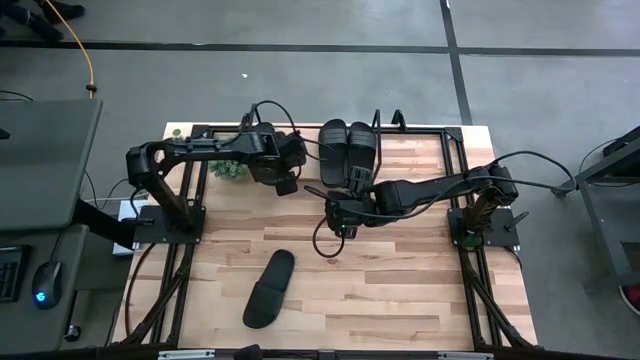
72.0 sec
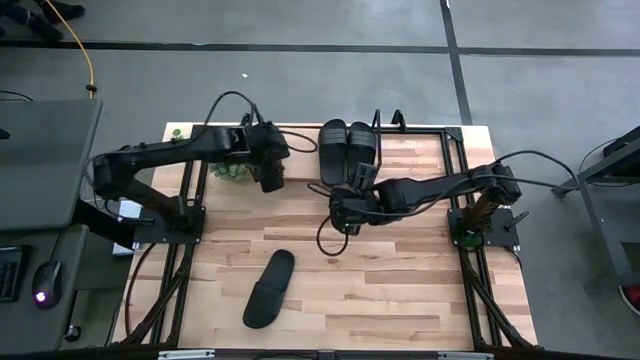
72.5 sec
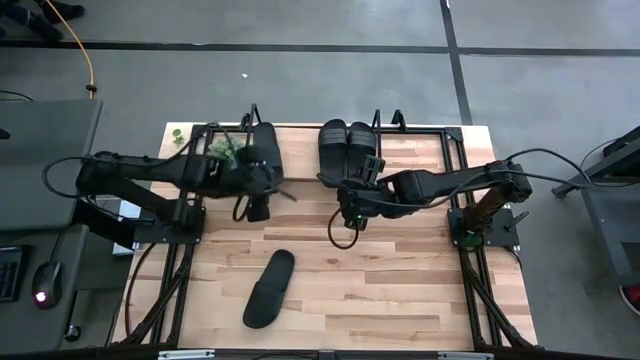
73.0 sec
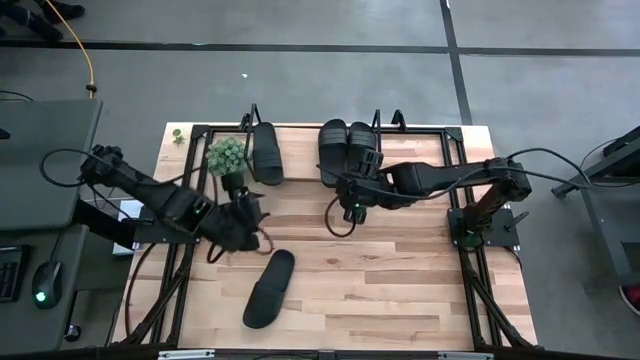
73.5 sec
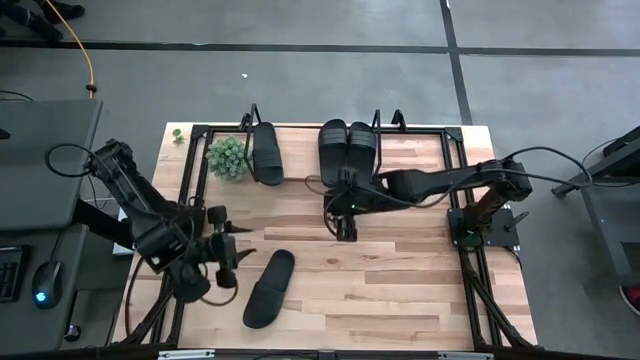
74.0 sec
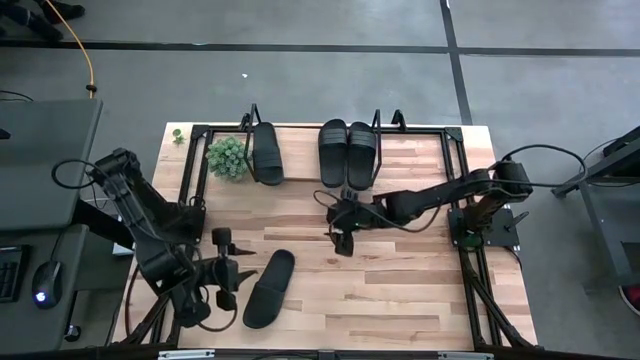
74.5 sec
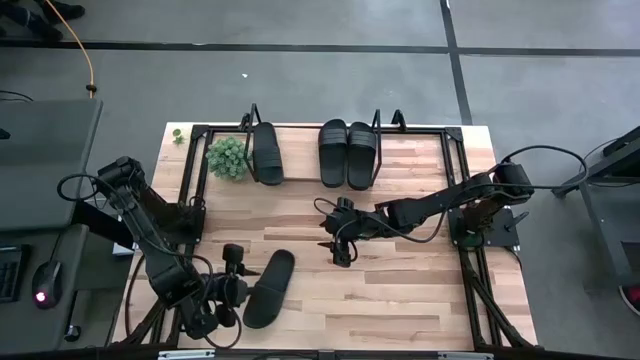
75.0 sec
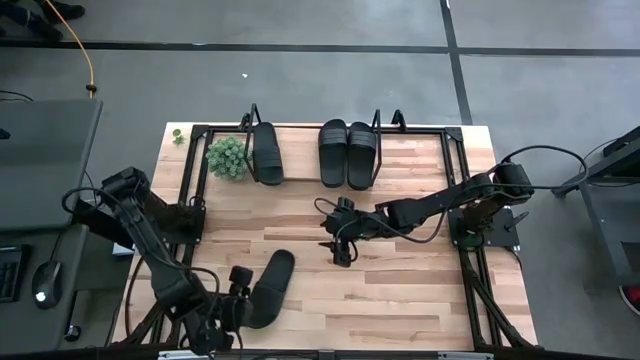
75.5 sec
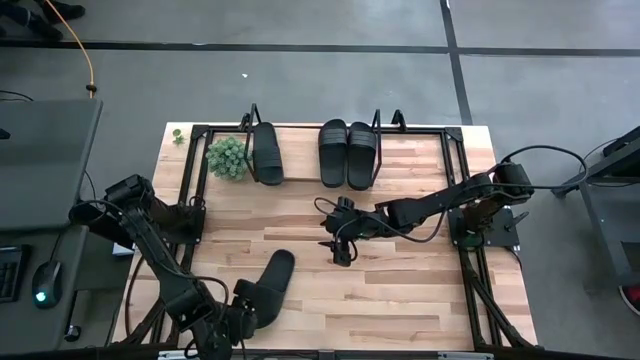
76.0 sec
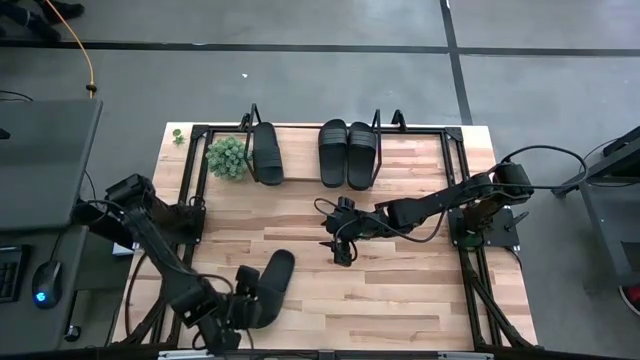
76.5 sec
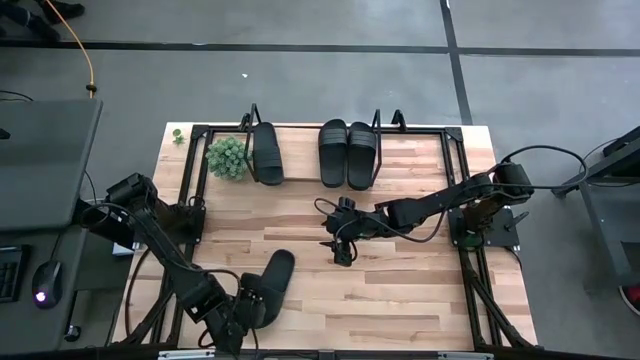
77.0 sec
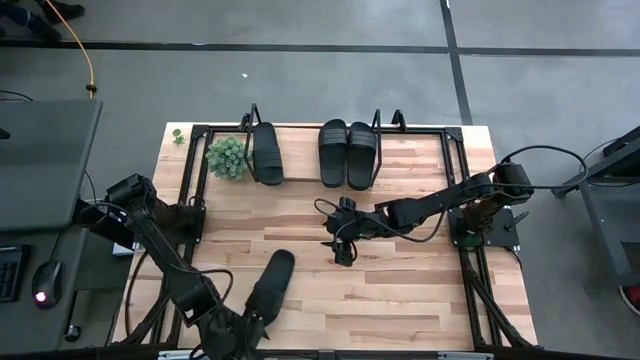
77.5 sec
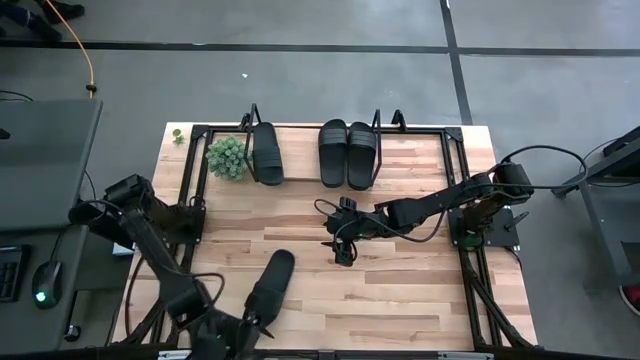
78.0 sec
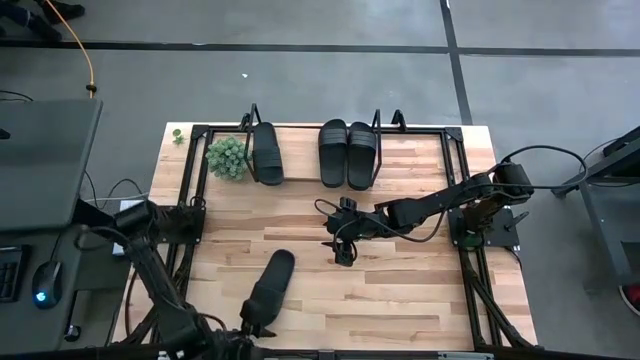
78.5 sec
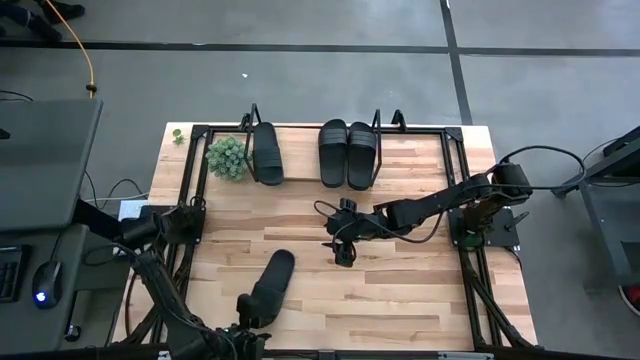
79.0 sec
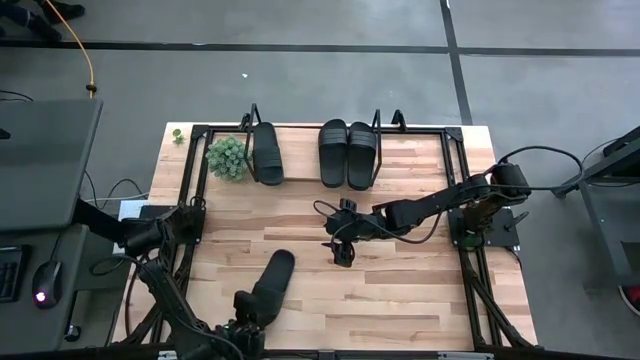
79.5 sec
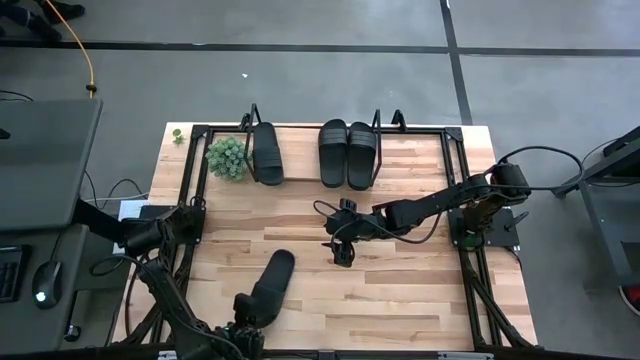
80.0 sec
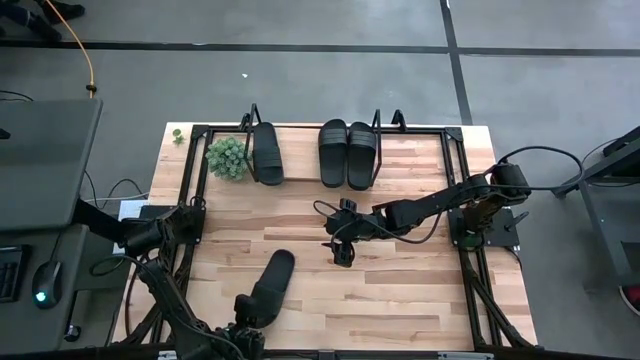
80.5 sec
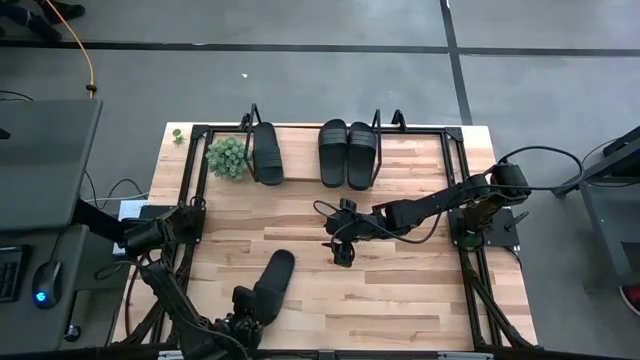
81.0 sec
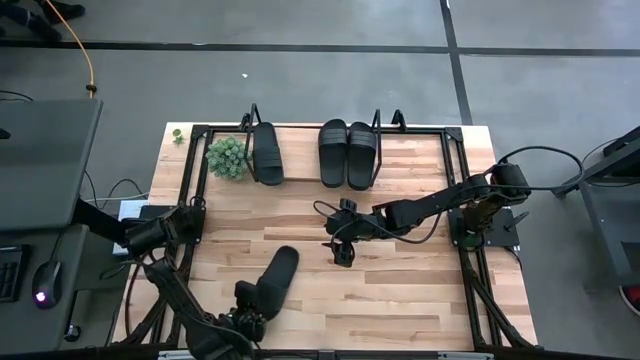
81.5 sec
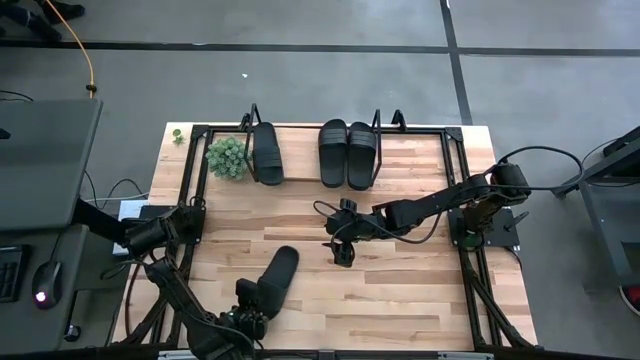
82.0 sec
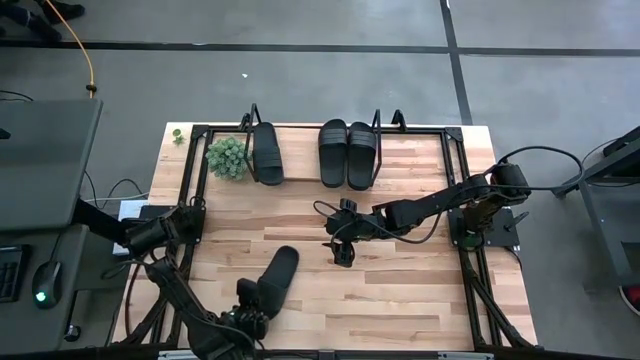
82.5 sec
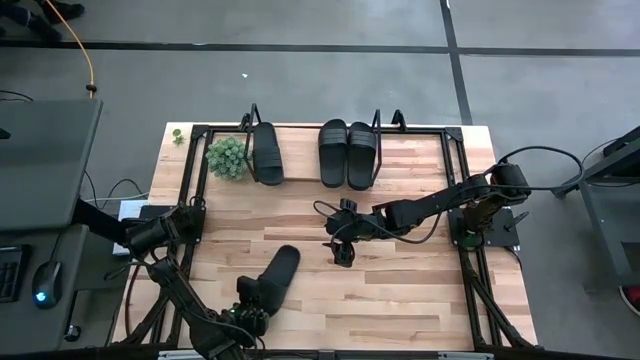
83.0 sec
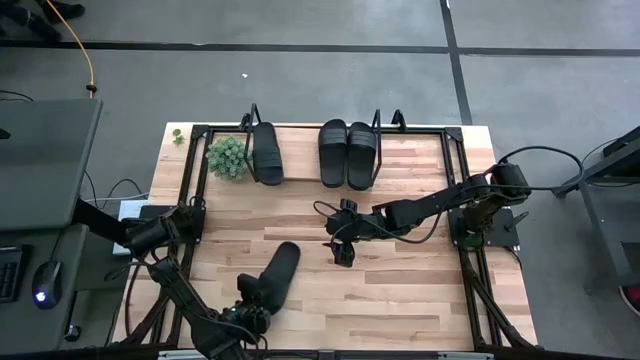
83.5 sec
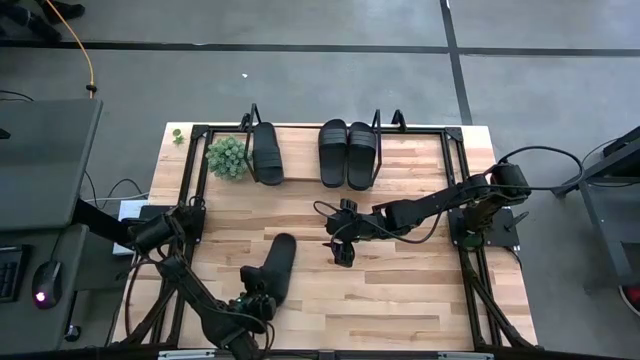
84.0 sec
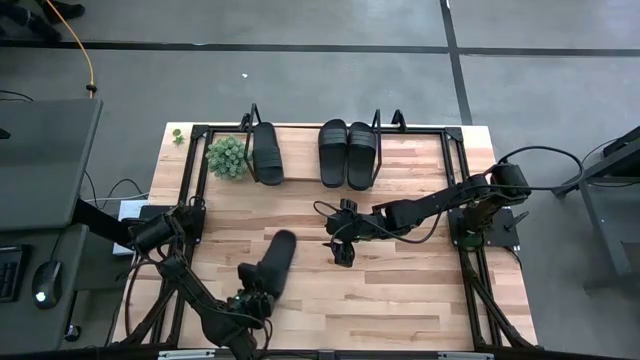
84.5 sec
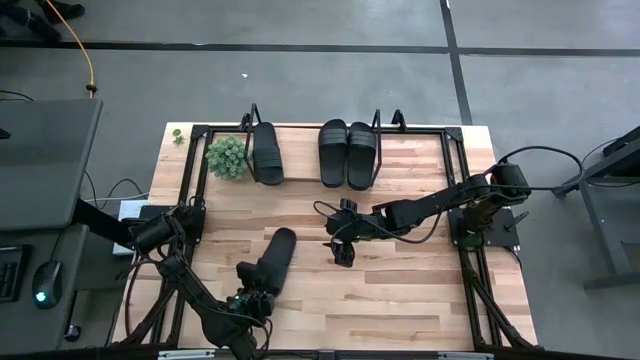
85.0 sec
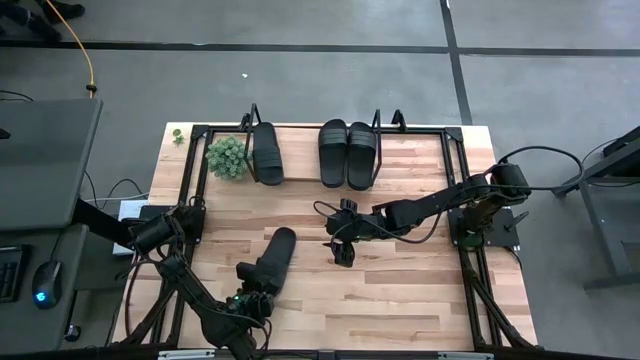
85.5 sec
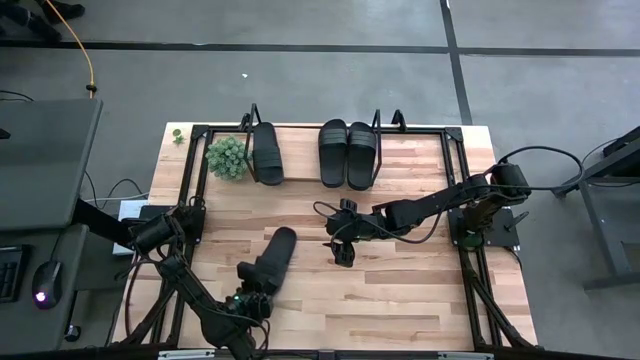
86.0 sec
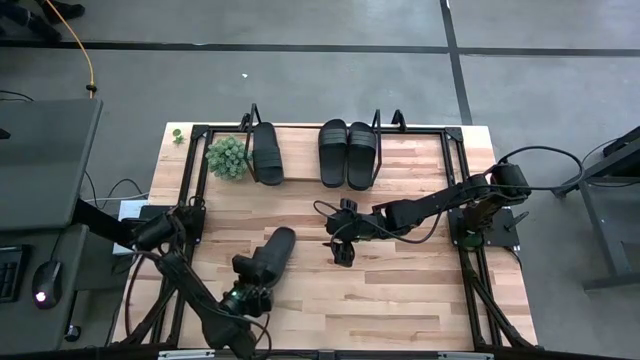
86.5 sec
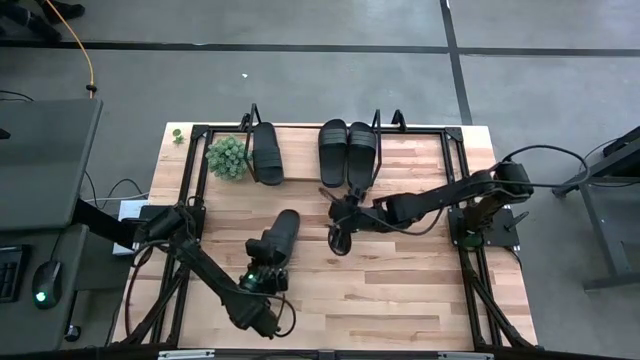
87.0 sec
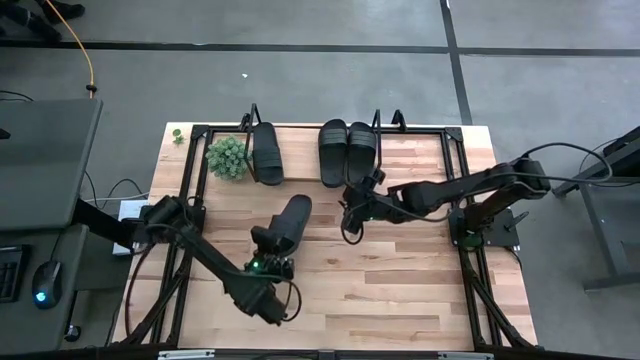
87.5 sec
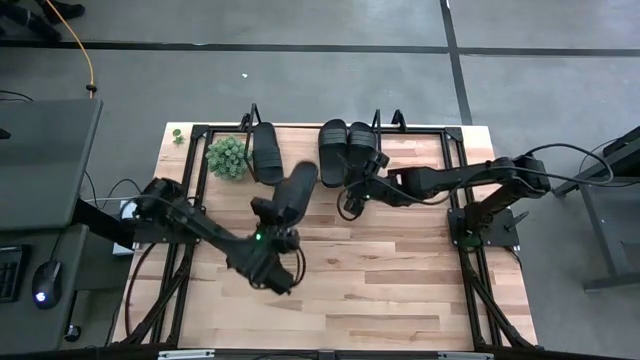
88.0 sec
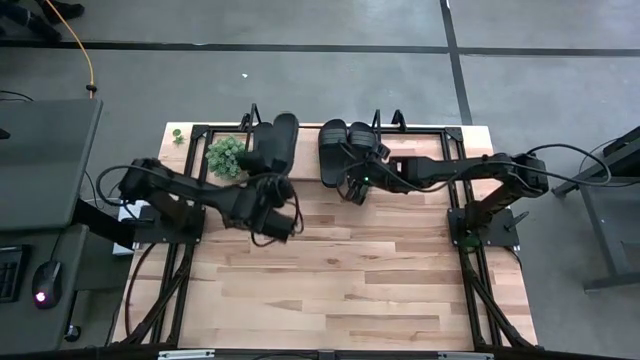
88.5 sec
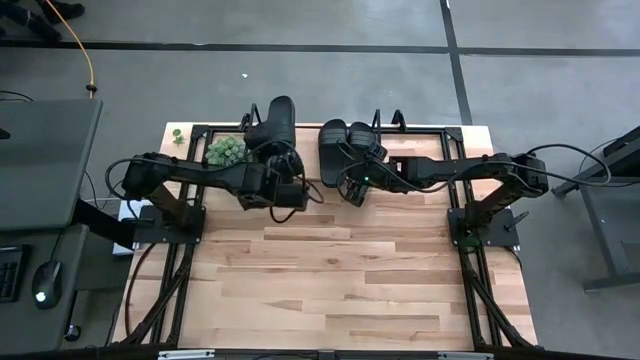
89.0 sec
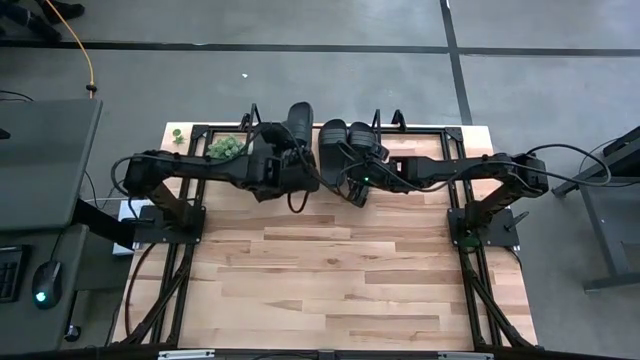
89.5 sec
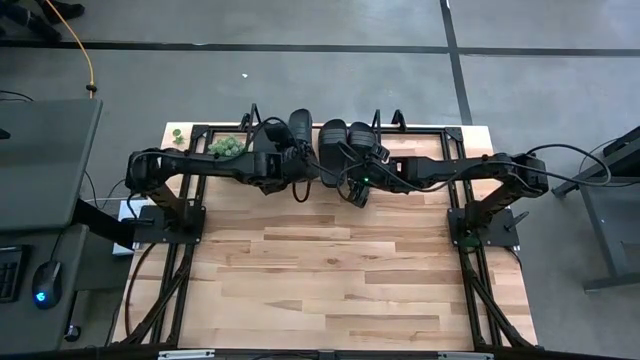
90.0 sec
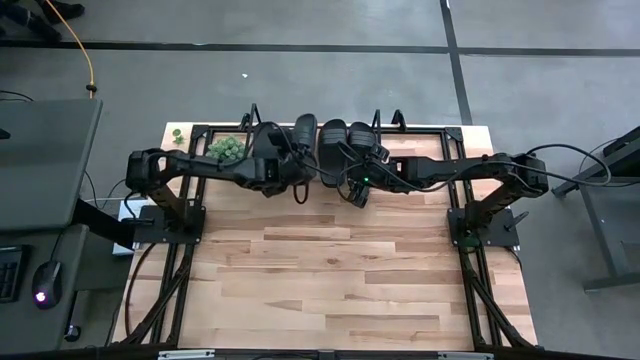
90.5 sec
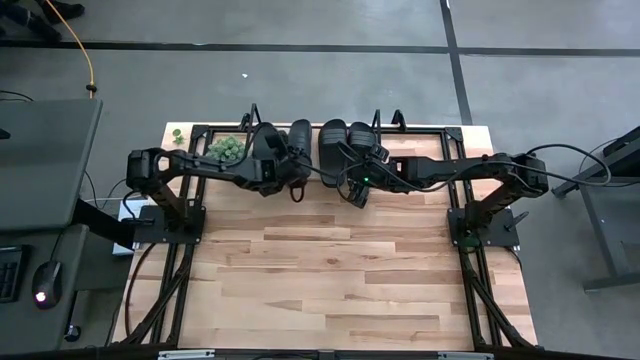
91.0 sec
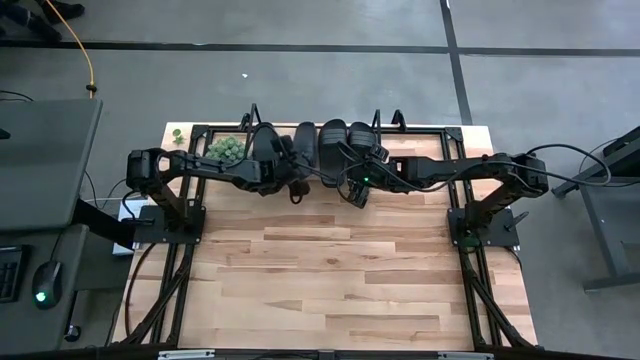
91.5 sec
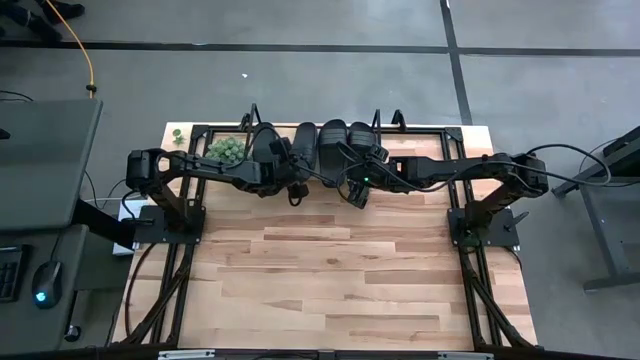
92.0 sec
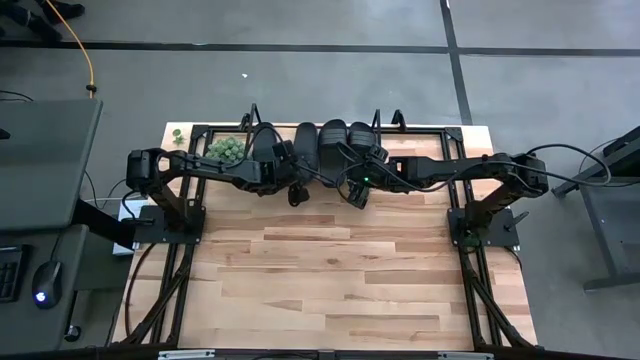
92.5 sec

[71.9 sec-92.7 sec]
Task: Pick and place slides into the shelf
Put the black slide on the shelf

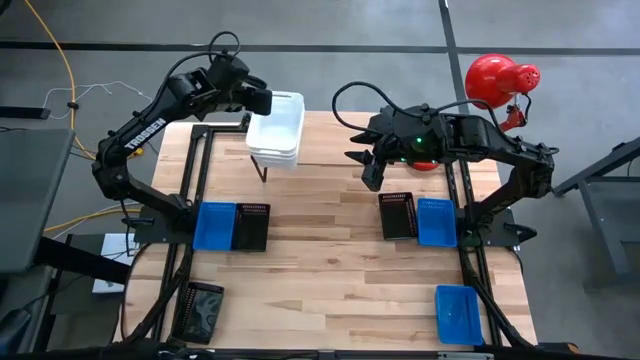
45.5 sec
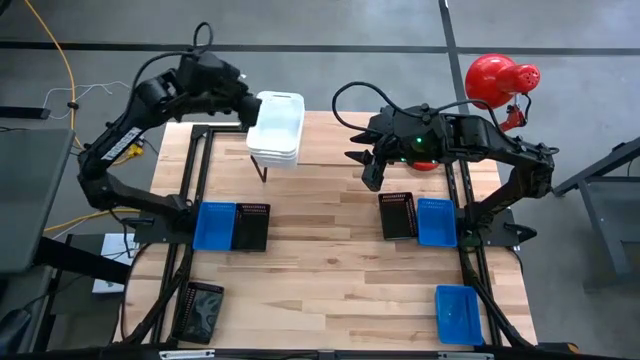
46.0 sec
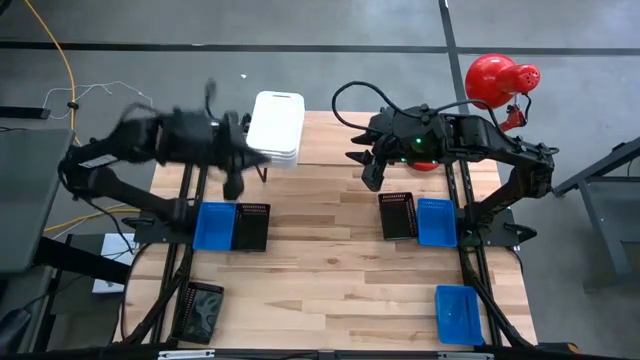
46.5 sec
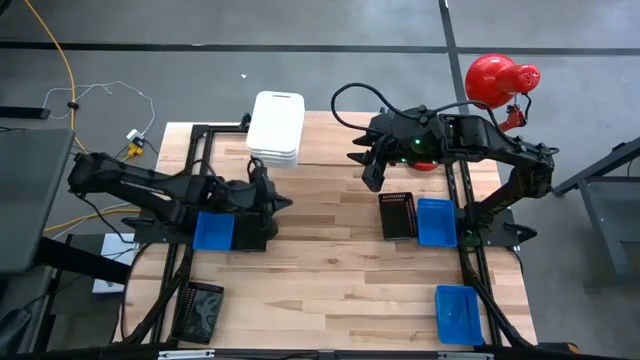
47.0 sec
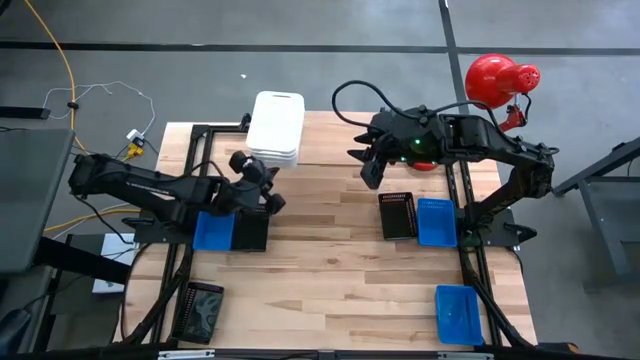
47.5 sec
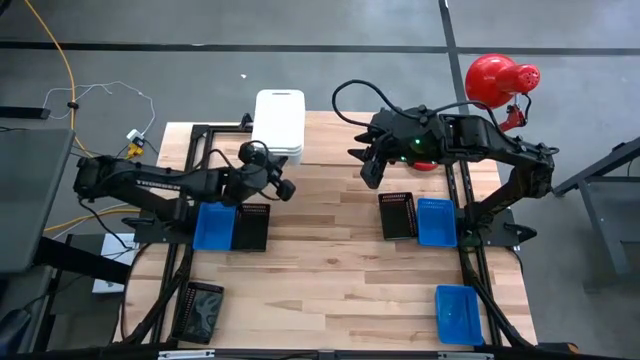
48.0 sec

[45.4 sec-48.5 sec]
Task: Stack baskets on shelf by color
Adjust the bottom white bin on the shelf
